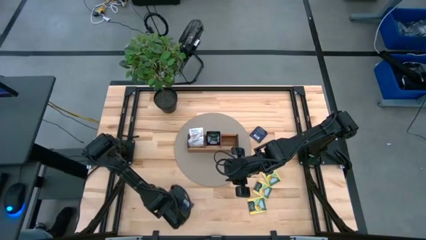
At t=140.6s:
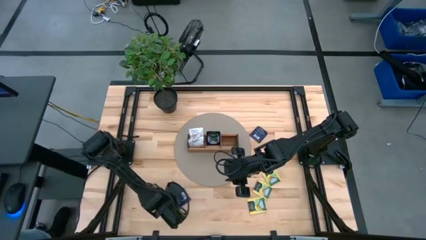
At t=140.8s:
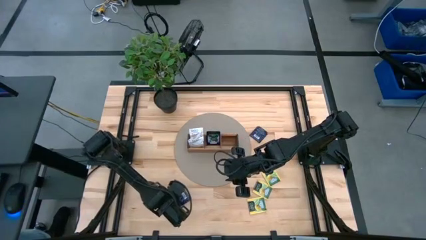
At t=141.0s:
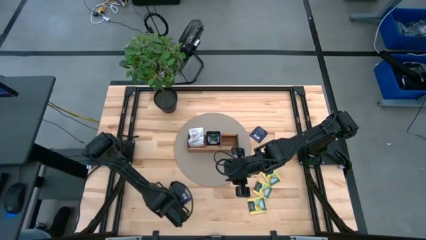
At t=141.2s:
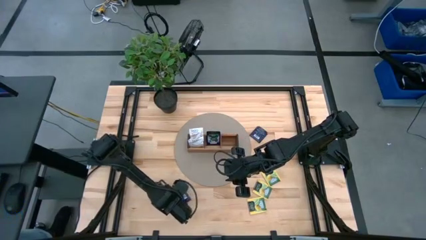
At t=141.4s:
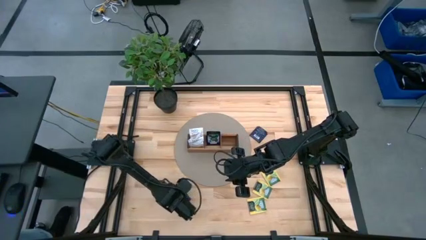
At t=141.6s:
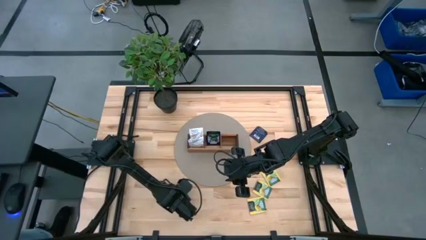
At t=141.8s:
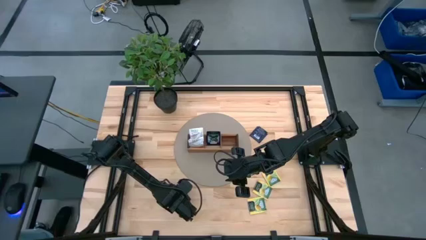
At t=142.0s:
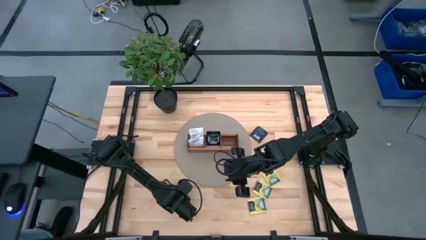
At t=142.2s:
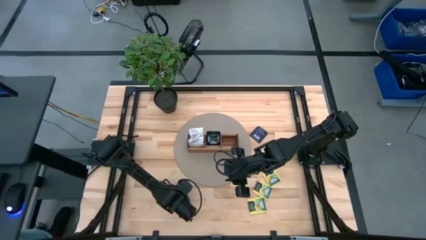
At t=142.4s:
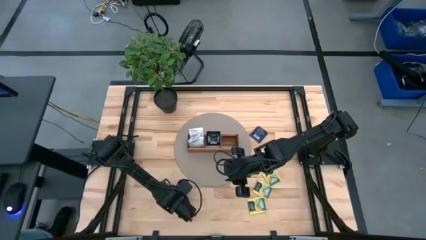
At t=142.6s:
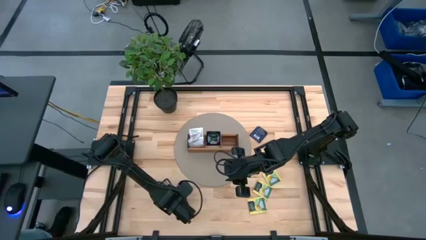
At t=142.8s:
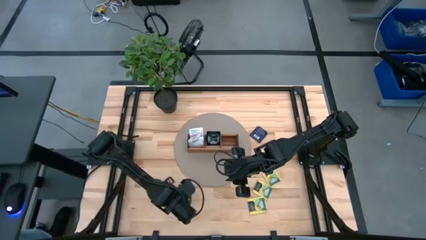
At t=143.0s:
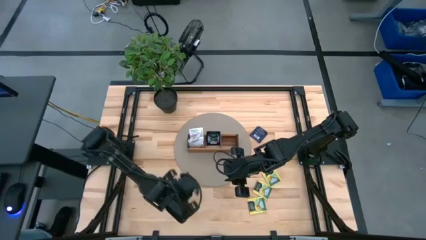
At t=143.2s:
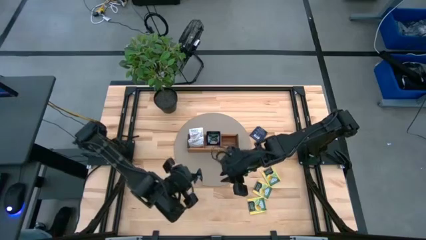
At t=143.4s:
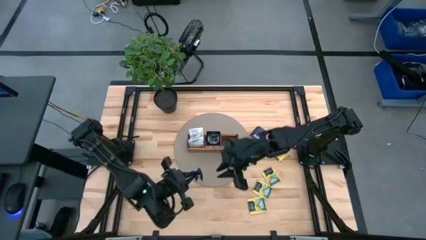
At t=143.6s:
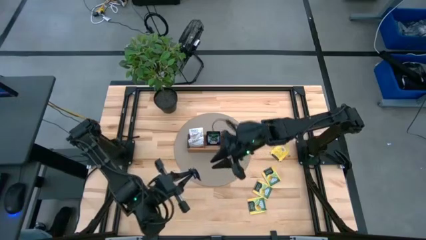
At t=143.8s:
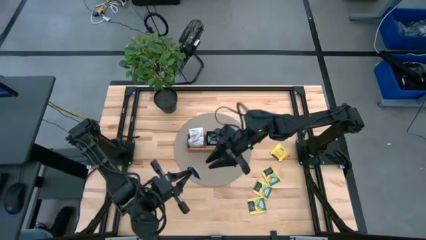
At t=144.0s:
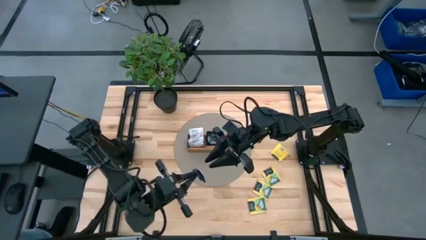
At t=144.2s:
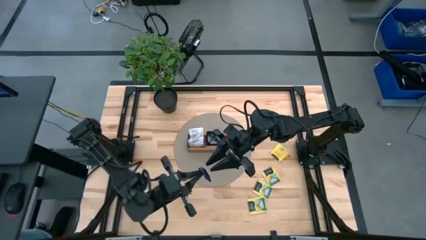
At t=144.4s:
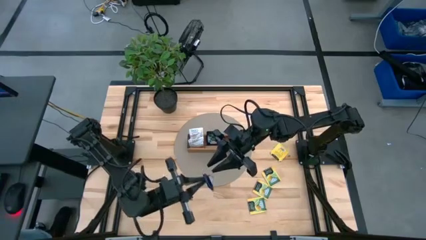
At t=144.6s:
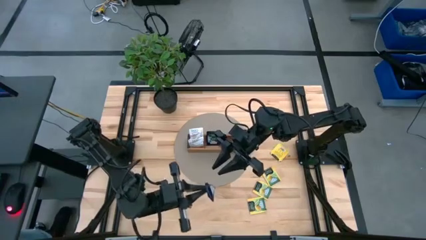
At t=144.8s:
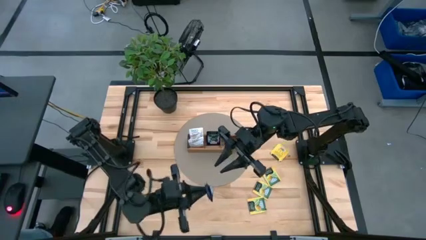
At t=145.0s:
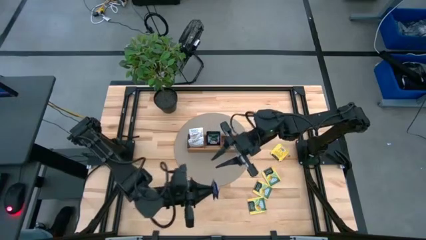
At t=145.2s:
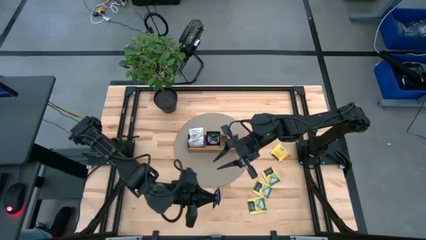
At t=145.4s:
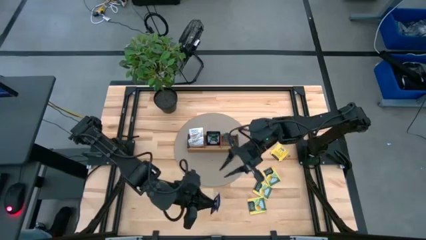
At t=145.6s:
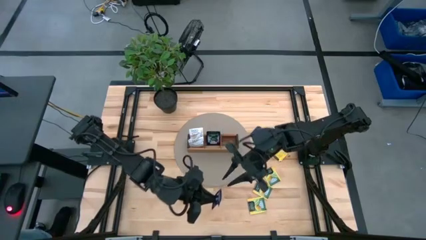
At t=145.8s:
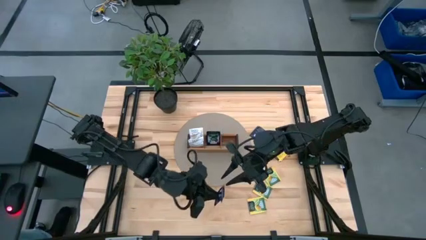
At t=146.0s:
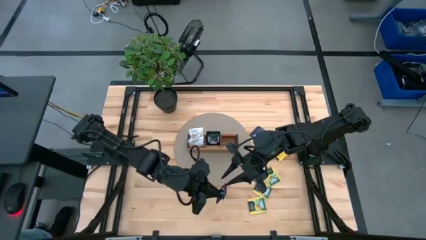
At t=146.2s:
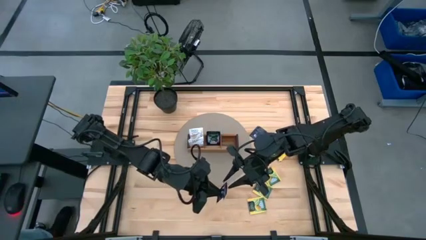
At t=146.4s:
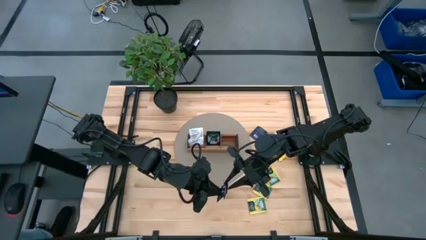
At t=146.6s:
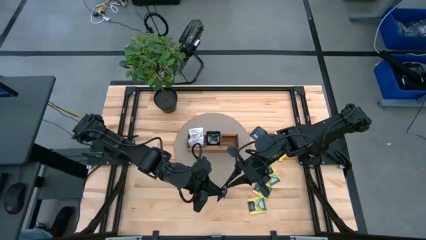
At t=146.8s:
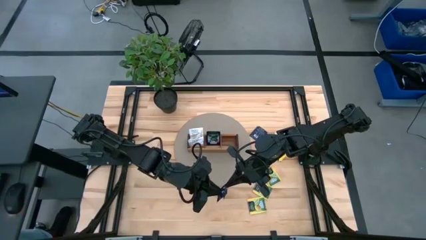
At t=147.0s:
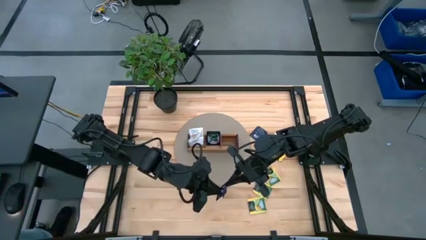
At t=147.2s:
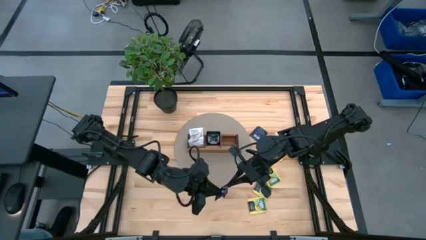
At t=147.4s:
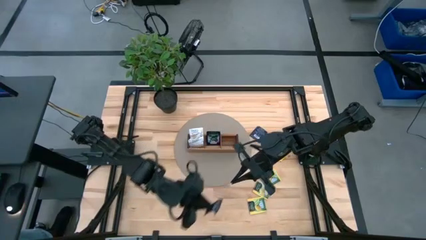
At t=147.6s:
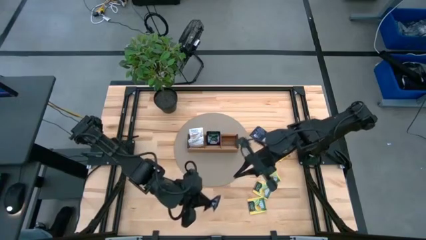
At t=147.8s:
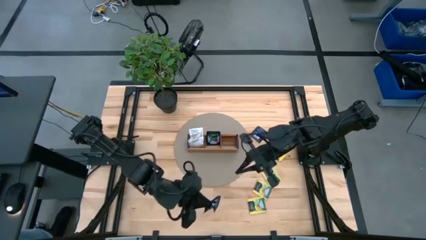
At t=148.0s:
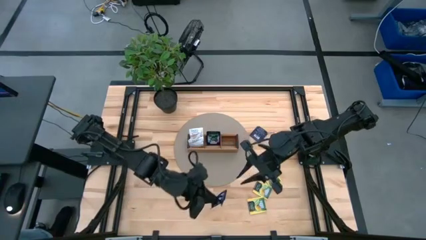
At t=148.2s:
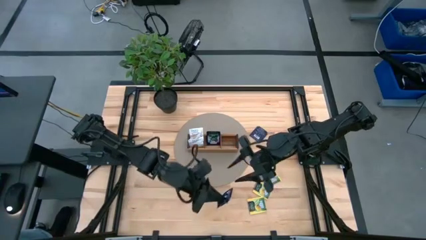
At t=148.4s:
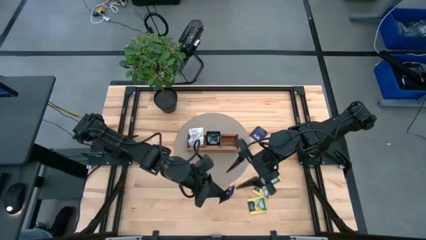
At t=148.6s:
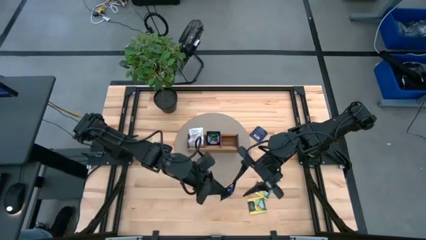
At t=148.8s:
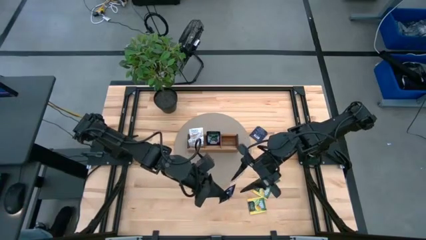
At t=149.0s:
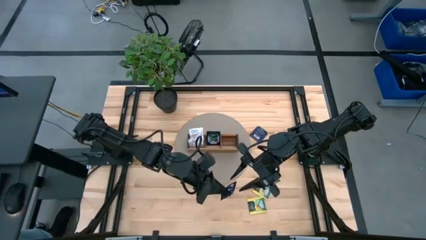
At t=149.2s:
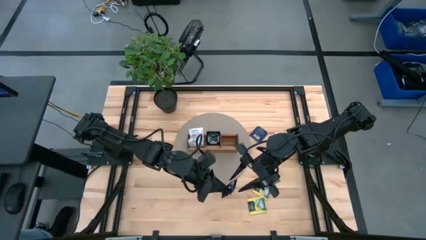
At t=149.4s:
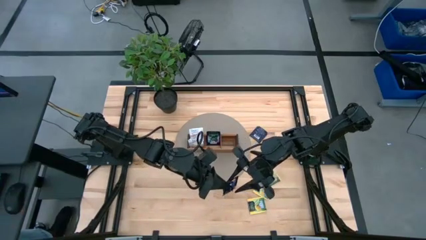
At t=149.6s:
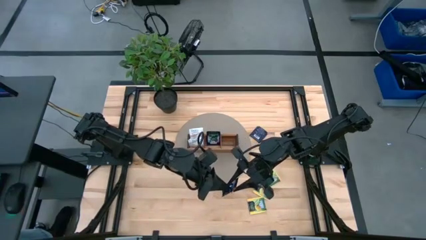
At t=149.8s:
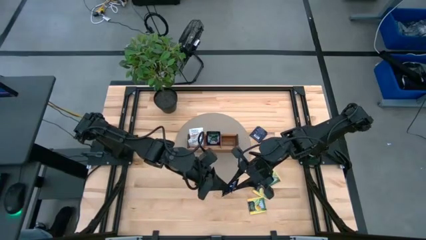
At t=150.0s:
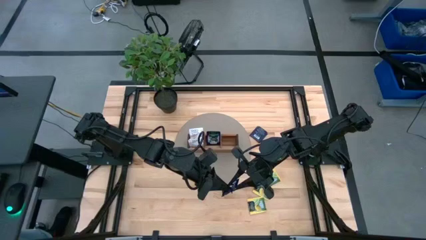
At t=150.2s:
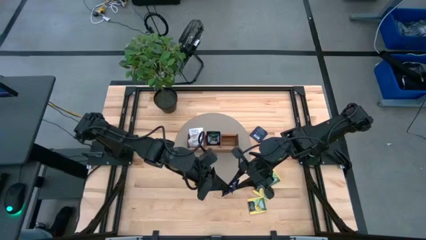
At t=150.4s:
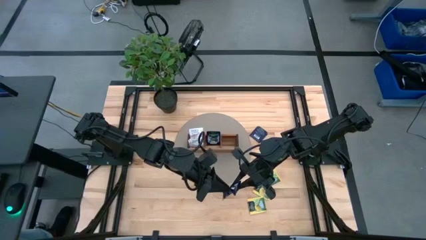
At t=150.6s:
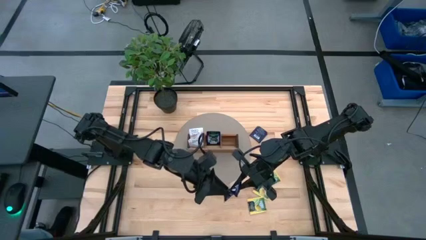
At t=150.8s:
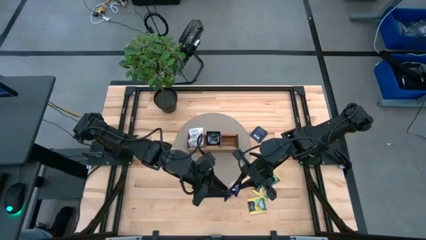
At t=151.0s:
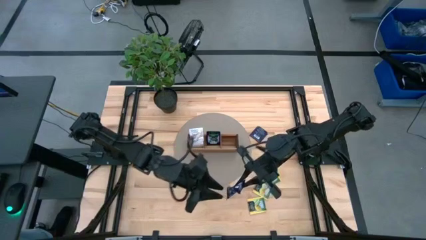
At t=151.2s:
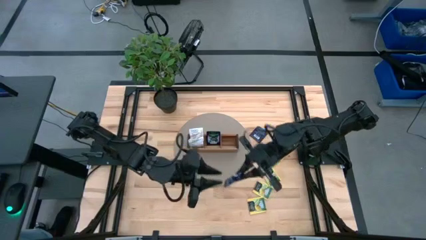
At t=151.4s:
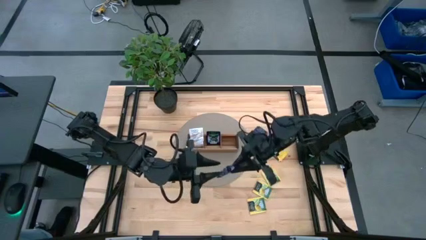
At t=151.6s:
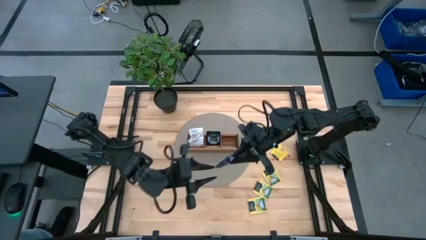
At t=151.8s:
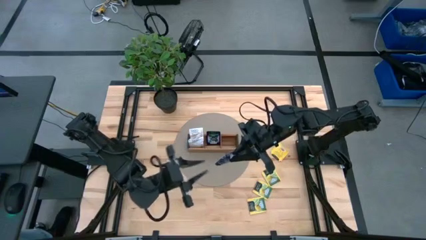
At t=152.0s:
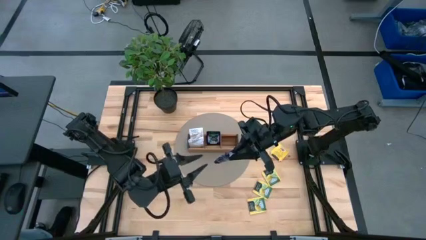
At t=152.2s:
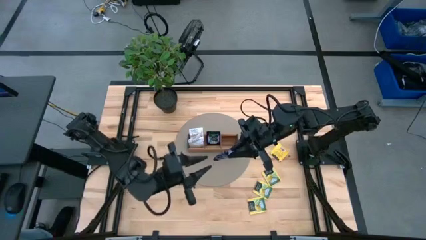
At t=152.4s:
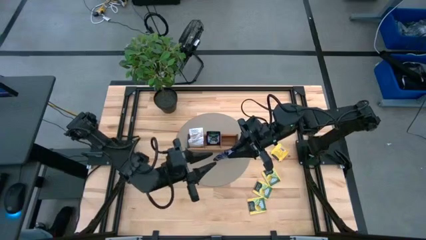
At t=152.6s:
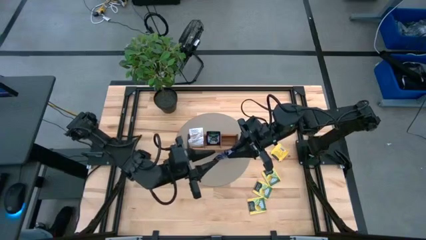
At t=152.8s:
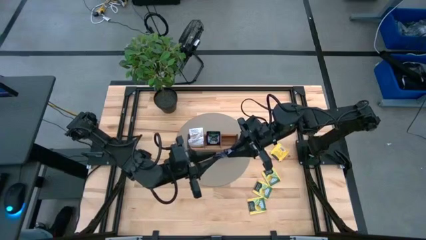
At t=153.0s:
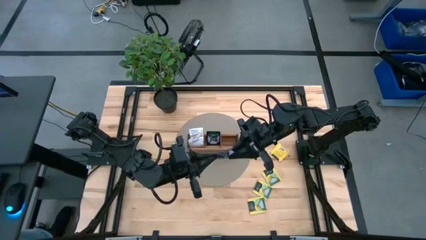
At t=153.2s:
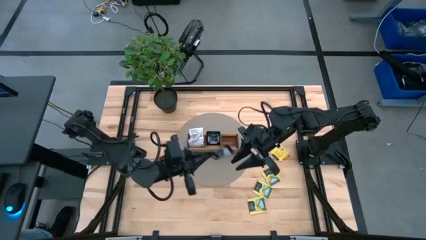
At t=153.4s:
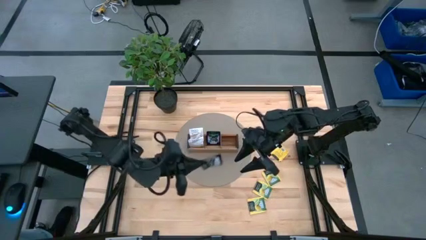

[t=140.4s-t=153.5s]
Task: Pick & Place Tea
Put the blue tea bag into the middle section of the wooden organizer

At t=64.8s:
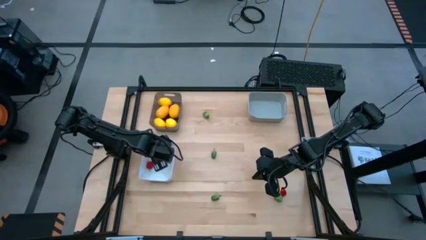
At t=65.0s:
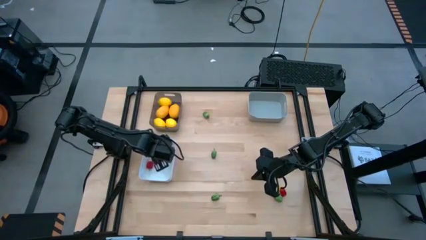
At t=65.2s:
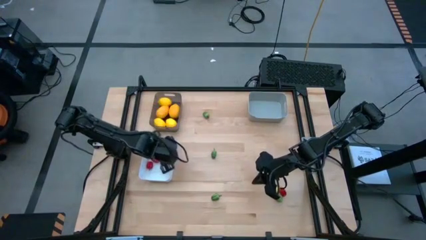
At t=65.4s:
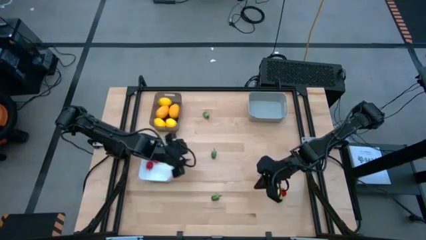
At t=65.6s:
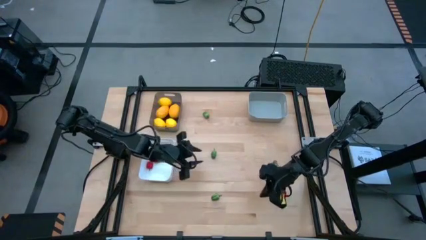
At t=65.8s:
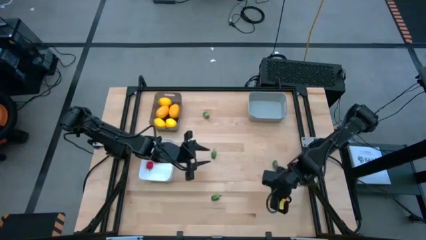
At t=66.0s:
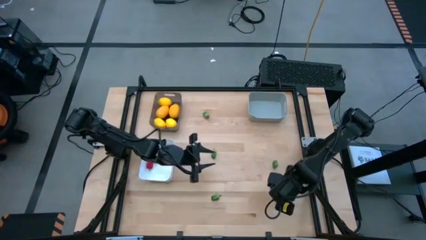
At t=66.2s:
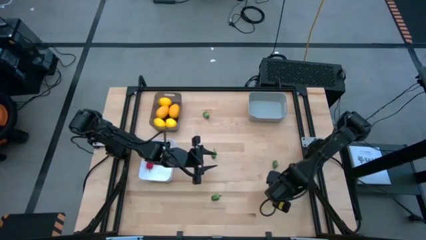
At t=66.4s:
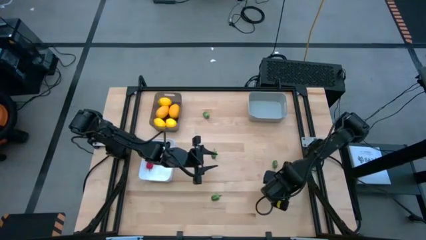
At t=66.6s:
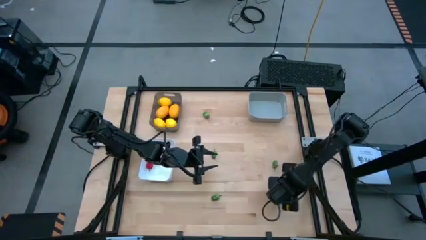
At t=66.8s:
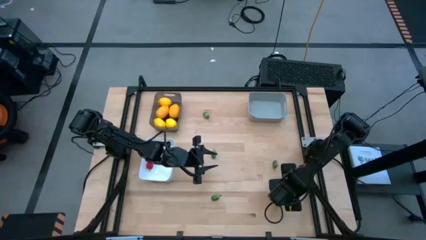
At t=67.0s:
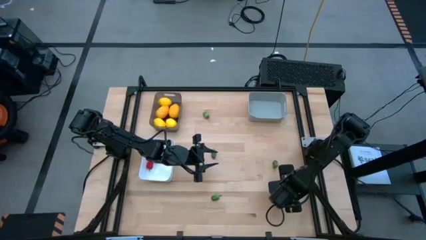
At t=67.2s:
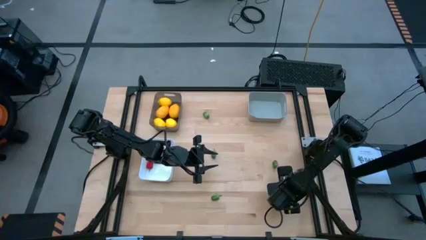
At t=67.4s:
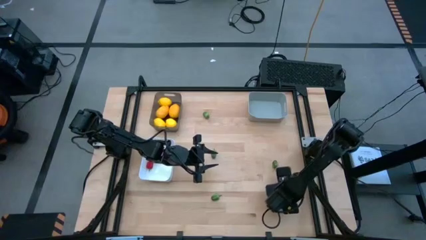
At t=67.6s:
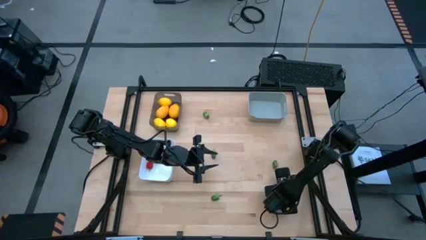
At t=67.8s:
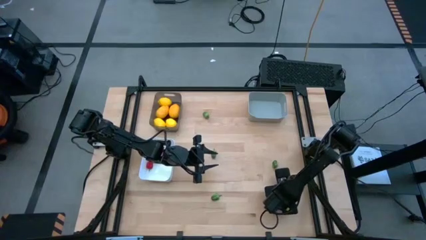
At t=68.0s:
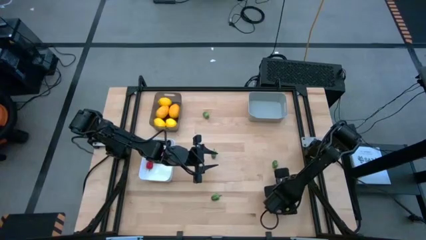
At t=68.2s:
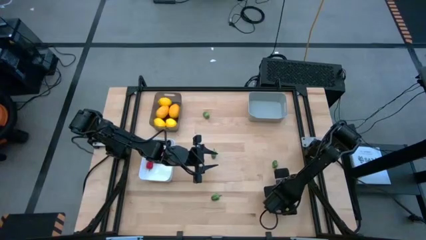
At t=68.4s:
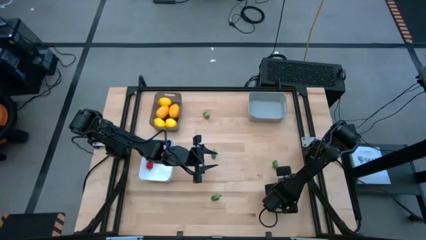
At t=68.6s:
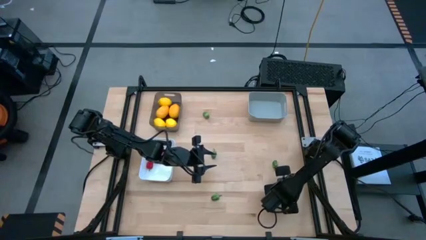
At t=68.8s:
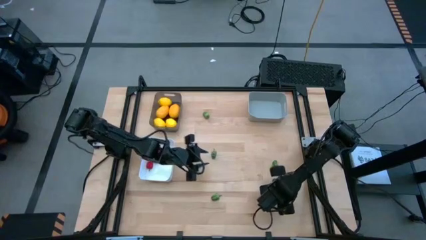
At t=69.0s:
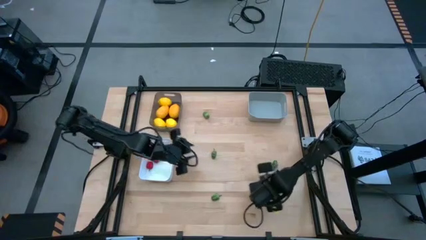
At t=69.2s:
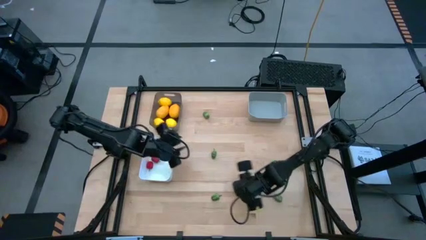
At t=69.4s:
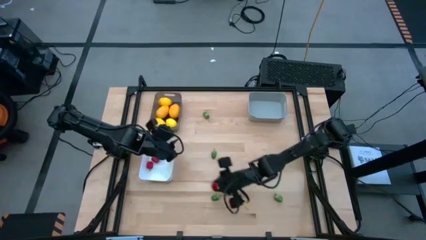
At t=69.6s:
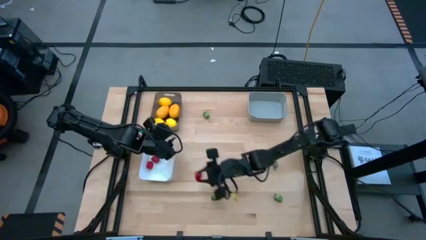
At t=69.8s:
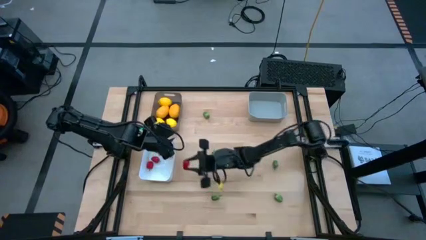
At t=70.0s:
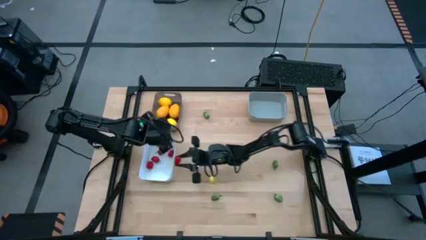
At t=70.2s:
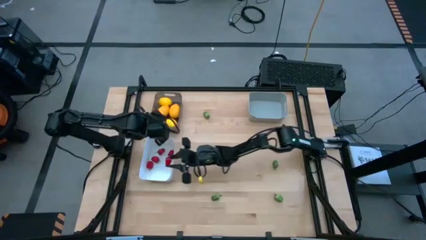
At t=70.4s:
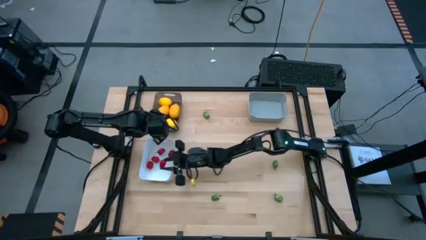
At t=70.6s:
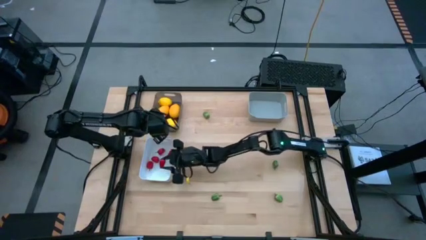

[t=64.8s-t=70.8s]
Task: Sort produce into baskets
Put the red chili pepper into the white bin
